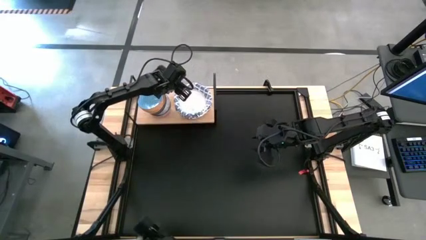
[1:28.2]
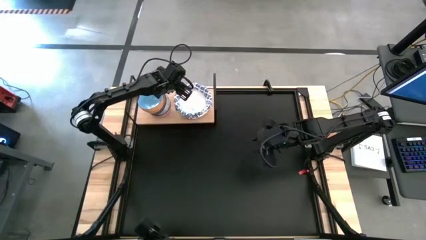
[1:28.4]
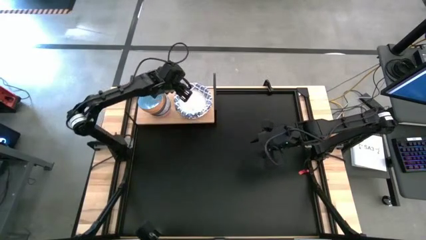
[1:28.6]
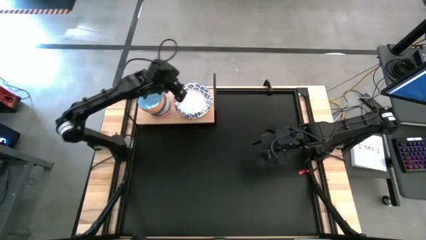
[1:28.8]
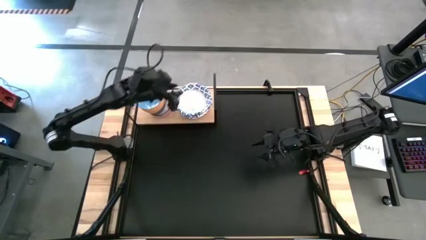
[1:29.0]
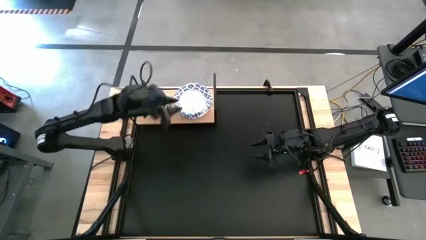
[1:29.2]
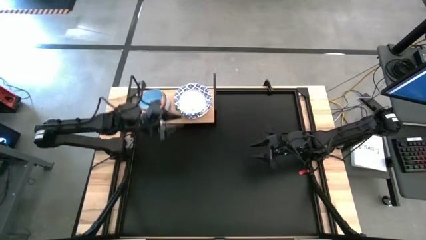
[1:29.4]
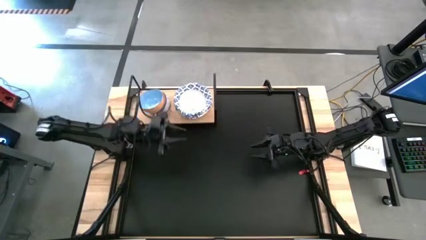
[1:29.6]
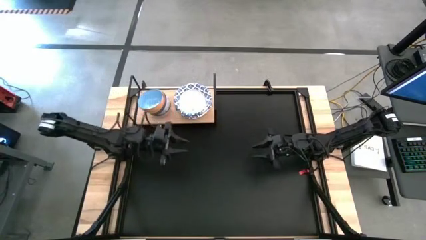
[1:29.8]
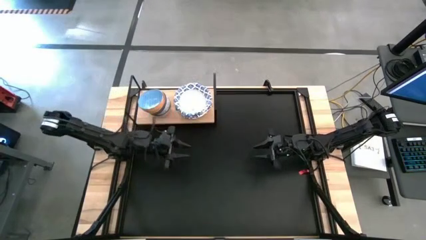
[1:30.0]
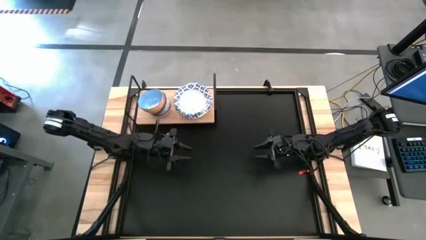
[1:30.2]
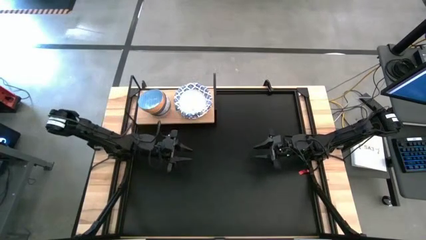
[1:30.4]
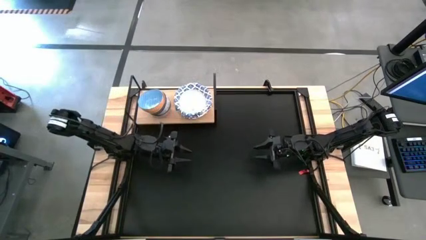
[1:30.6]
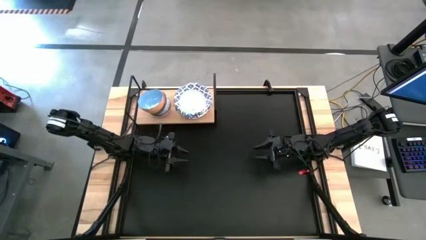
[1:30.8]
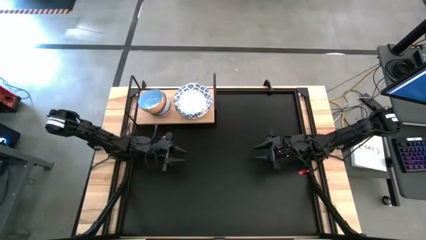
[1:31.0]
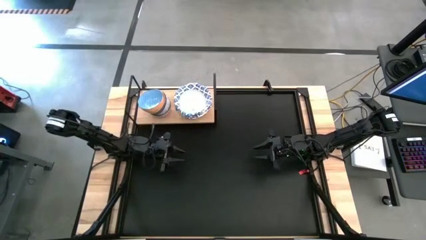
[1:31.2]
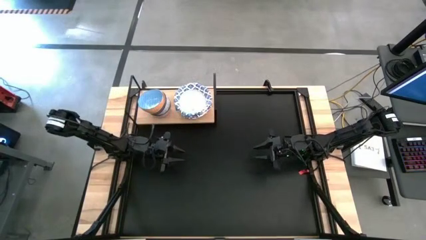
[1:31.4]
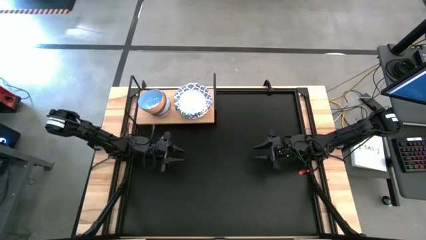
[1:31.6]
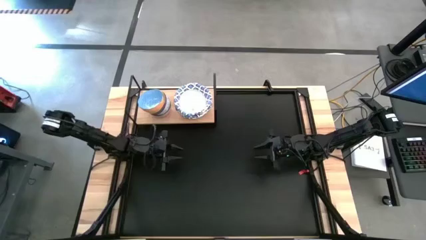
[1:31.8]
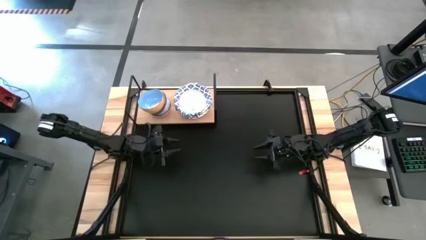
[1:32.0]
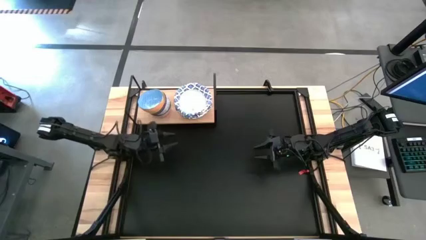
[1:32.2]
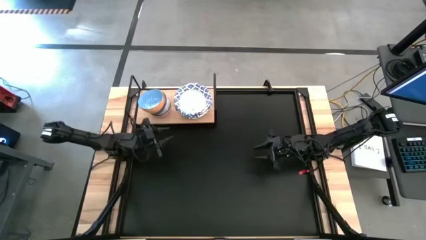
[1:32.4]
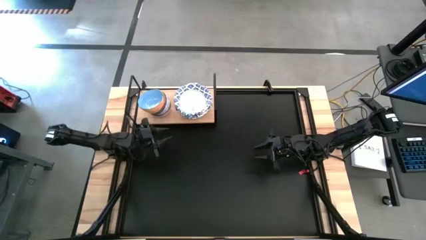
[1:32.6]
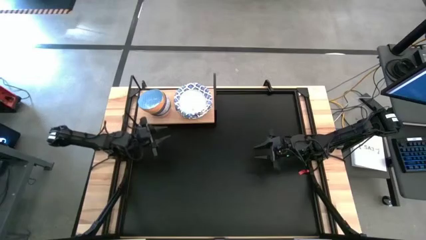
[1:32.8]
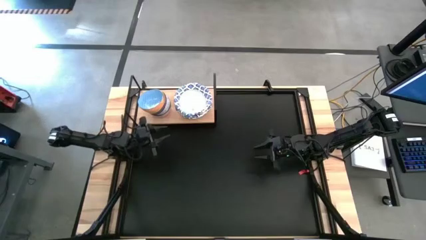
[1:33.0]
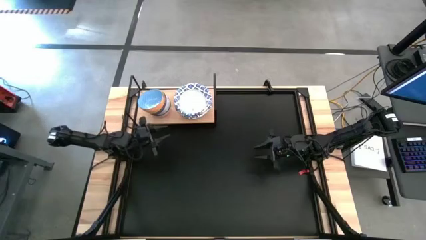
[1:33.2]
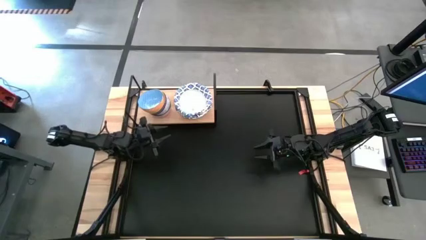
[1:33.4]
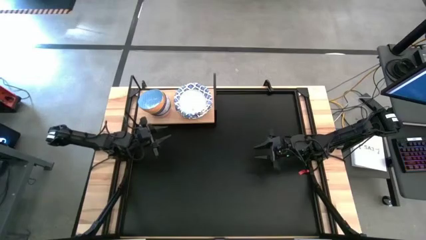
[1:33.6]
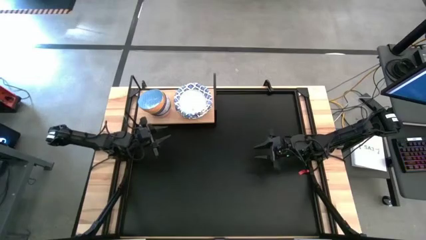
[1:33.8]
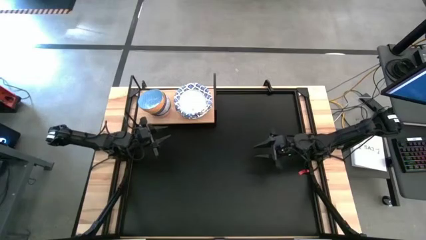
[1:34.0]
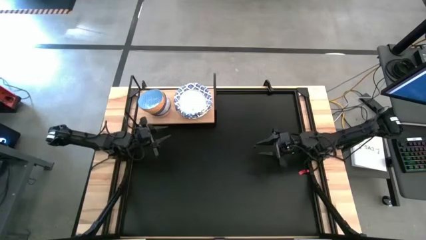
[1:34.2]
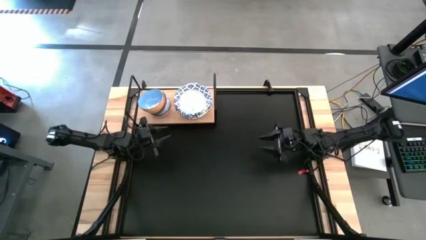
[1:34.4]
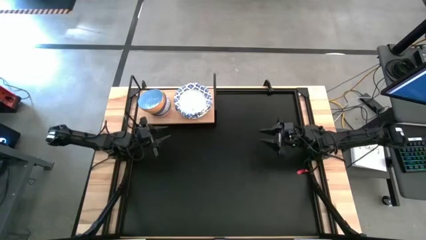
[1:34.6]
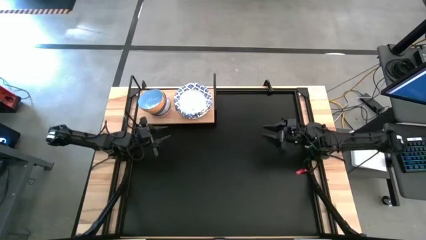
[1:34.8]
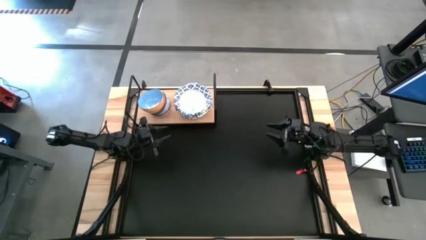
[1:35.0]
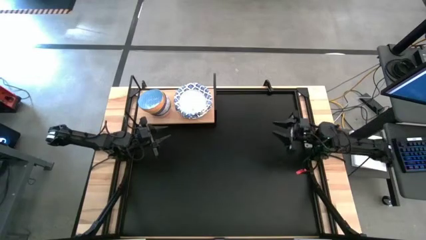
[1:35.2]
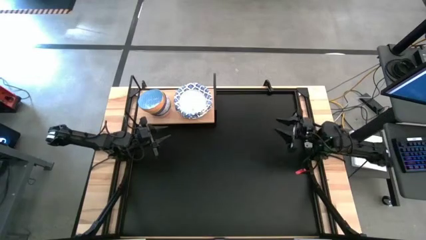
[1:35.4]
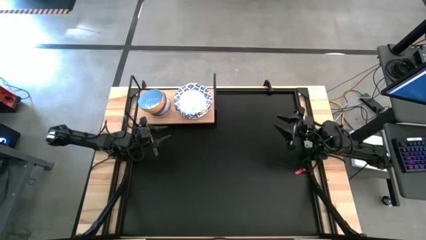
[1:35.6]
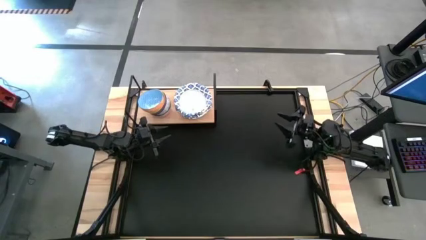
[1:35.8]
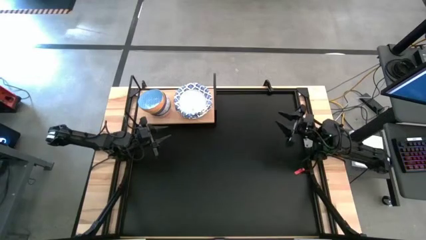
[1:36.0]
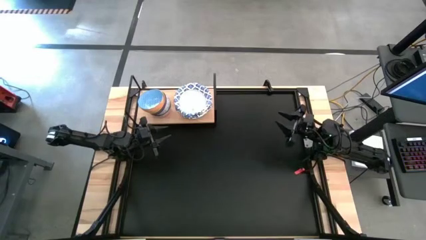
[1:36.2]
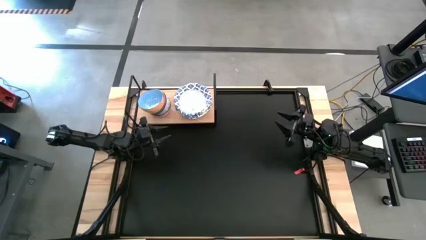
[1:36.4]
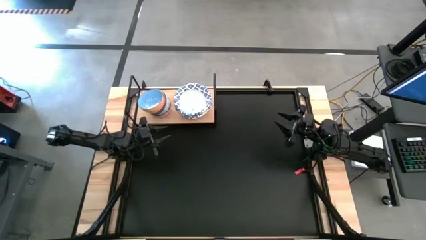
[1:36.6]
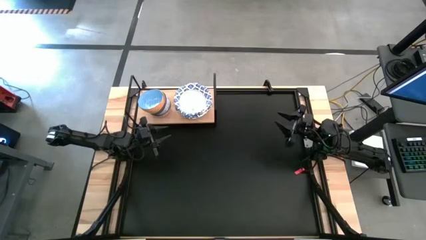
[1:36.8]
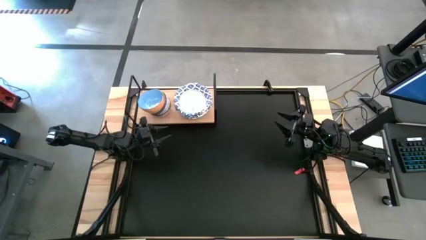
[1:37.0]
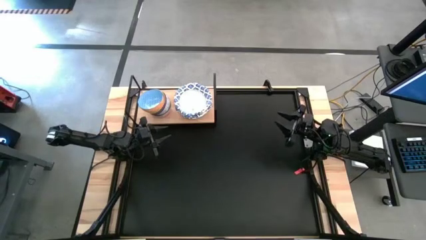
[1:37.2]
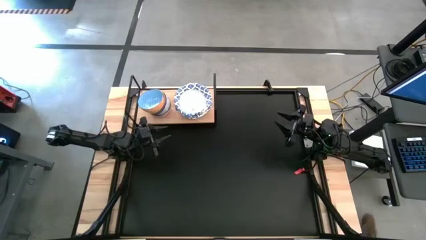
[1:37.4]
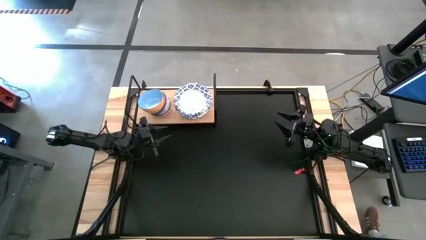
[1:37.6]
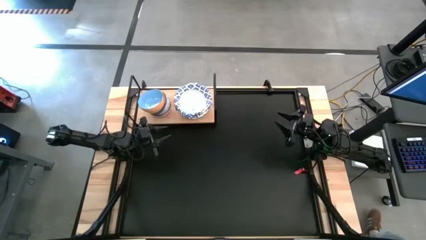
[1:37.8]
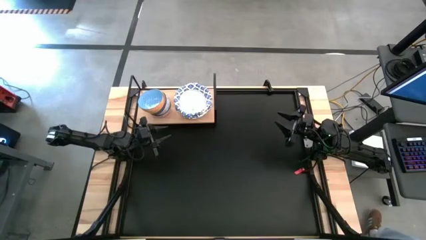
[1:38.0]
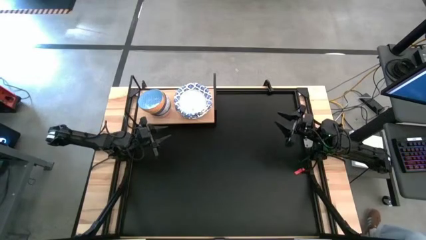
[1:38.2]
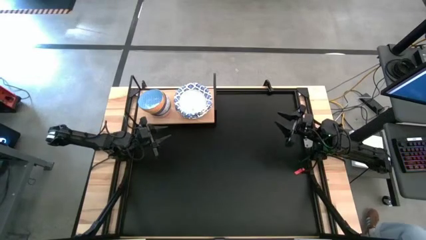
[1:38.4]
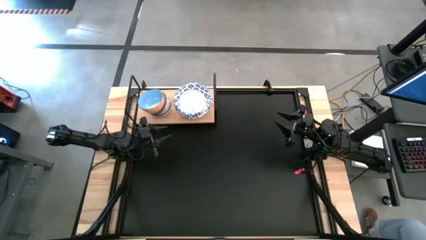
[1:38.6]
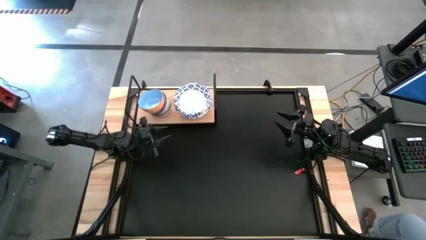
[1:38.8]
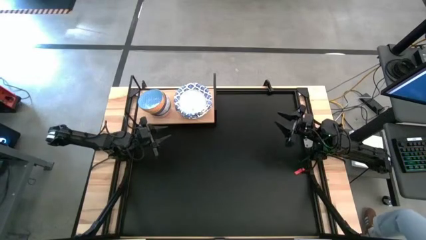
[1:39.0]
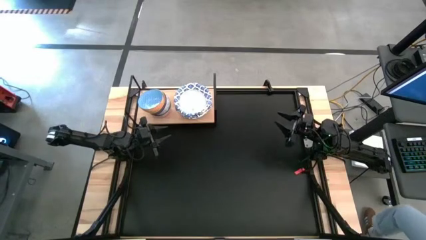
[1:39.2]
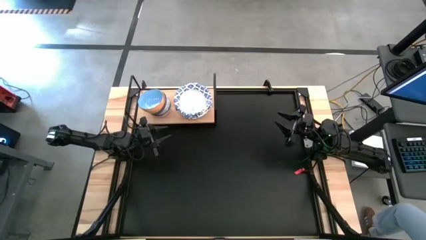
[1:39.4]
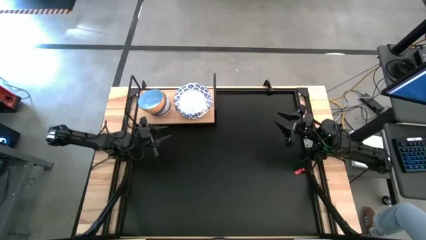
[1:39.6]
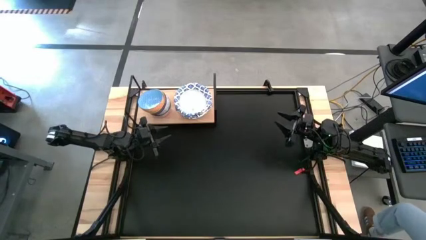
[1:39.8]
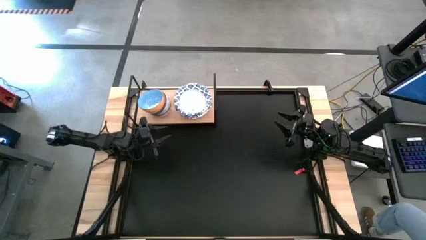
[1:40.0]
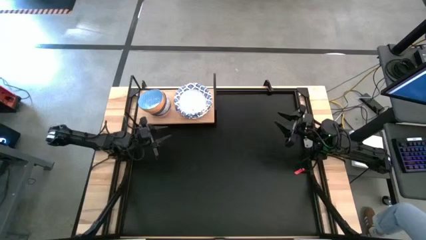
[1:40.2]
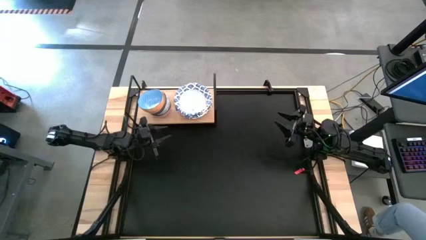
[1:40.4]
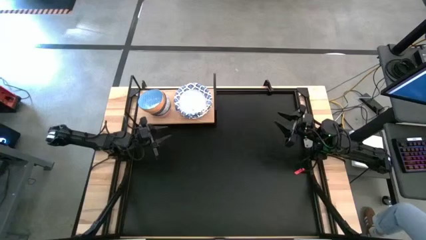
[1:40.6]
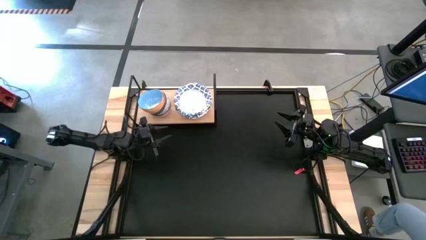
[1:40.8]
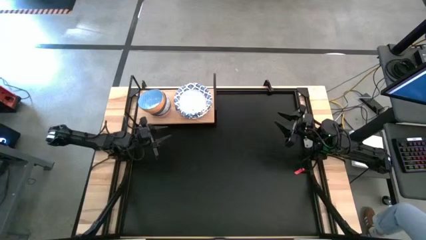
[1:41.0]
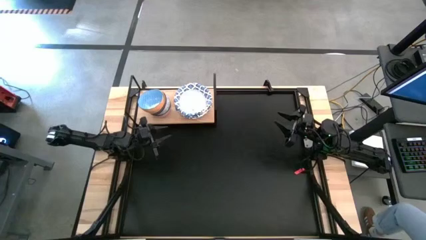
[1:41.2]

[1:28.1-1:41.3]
Task: Place and stack bowls onto a shelf
Return to Home Position
